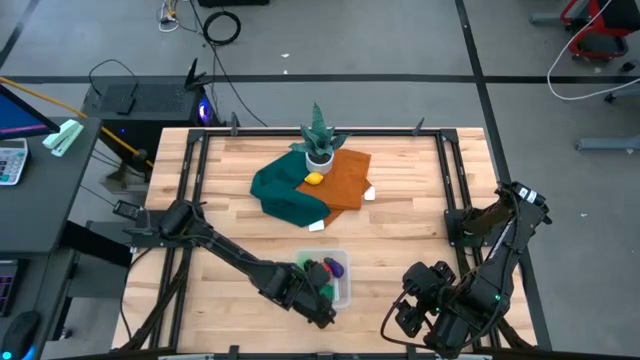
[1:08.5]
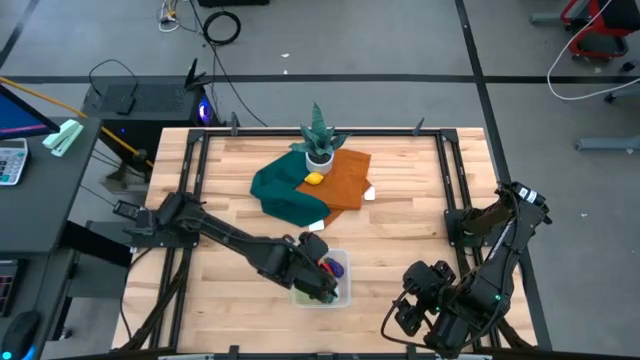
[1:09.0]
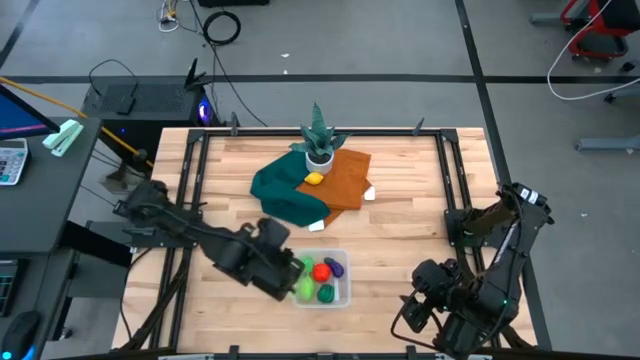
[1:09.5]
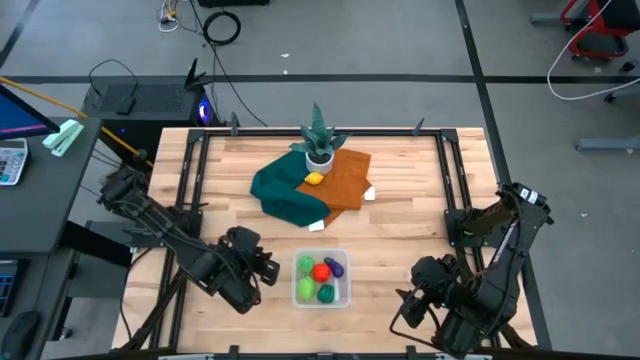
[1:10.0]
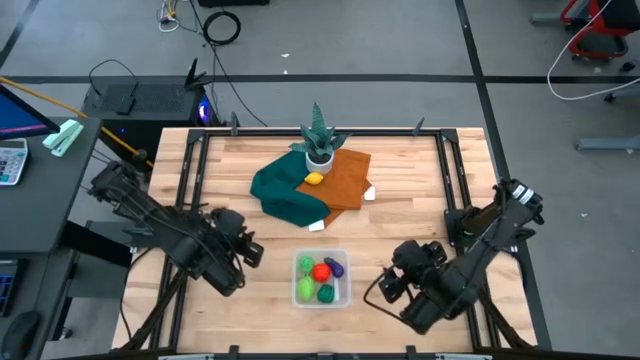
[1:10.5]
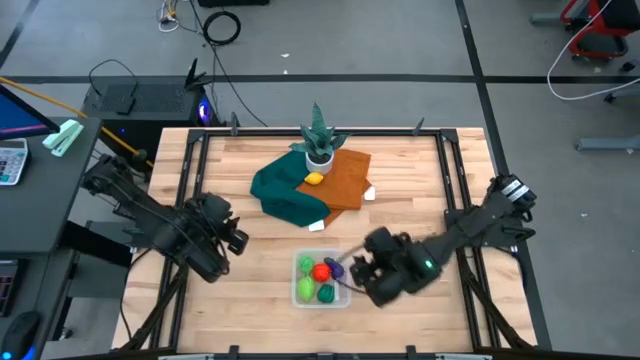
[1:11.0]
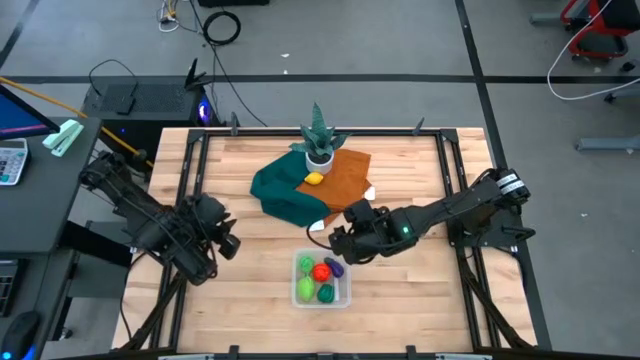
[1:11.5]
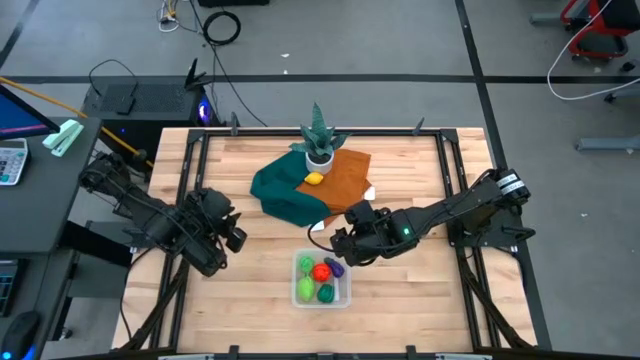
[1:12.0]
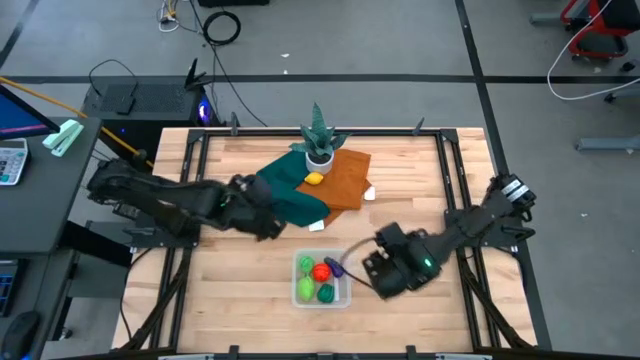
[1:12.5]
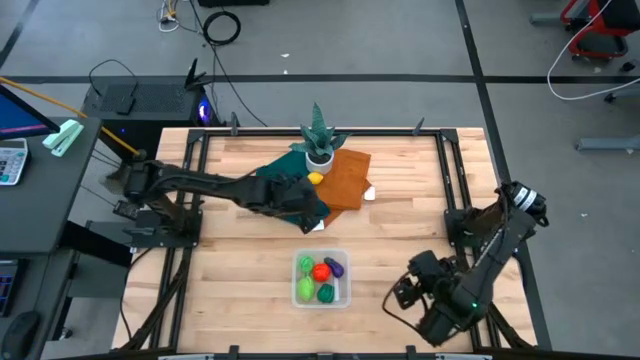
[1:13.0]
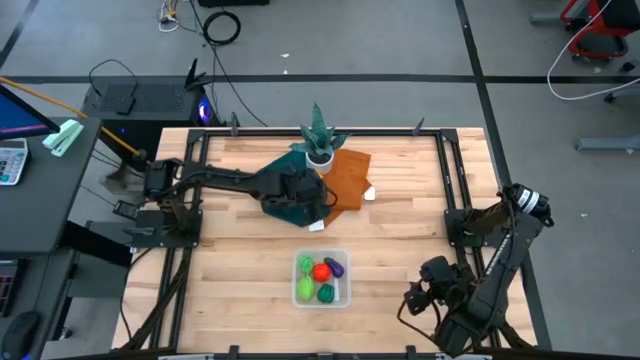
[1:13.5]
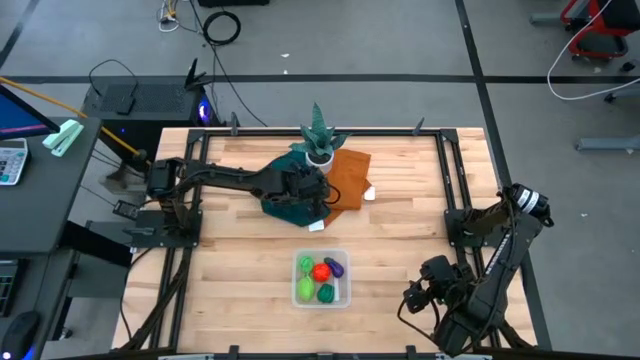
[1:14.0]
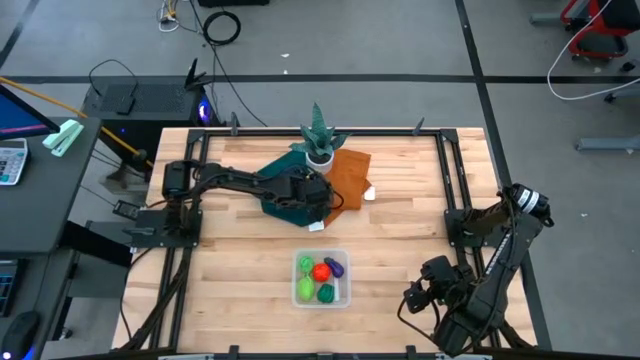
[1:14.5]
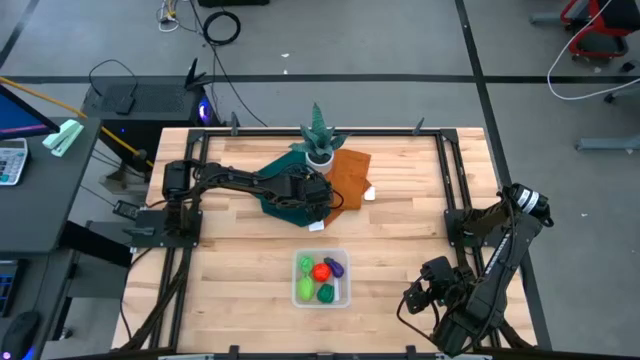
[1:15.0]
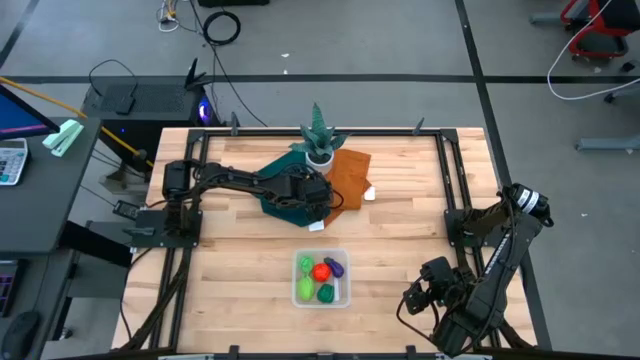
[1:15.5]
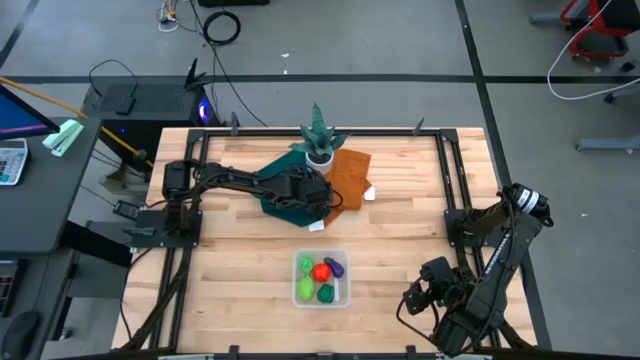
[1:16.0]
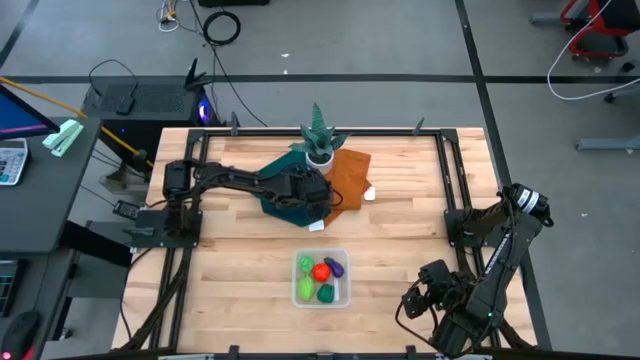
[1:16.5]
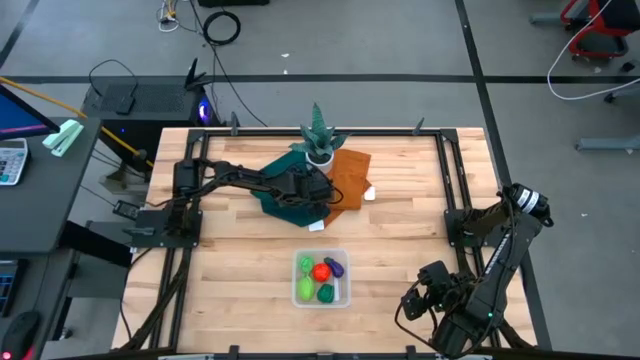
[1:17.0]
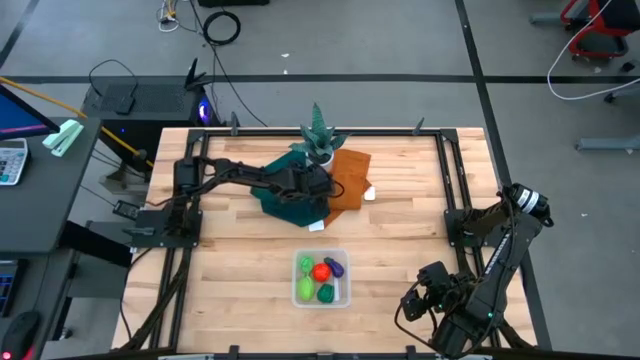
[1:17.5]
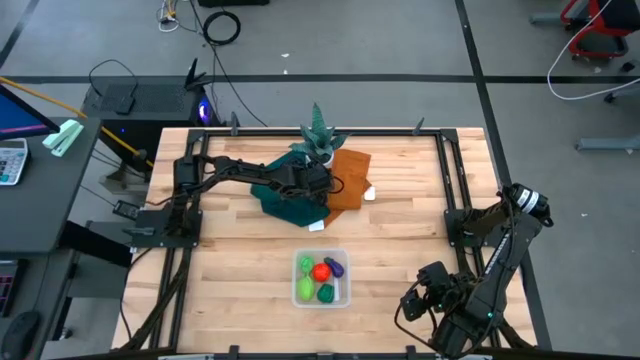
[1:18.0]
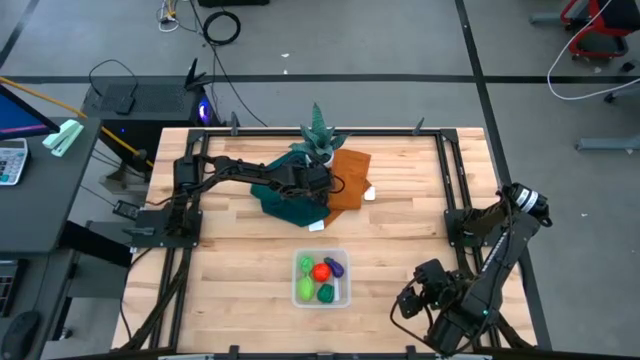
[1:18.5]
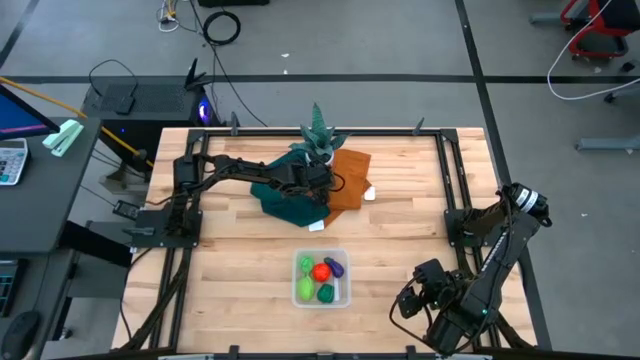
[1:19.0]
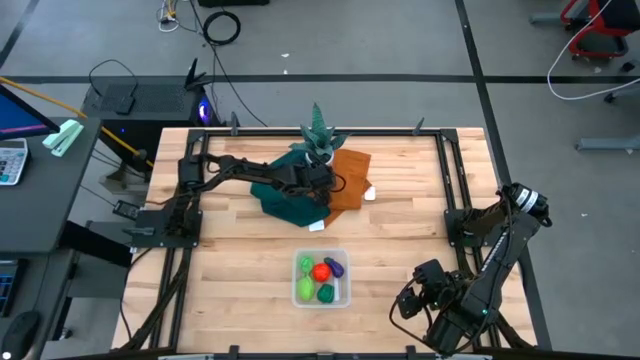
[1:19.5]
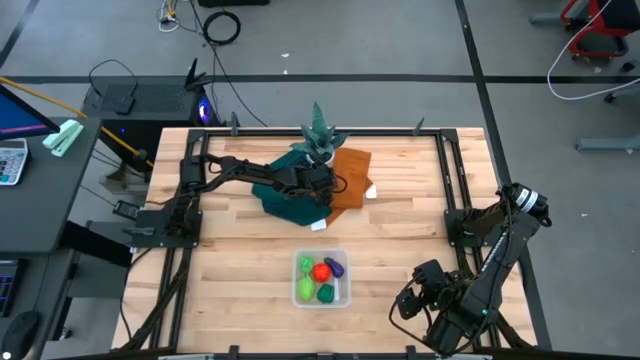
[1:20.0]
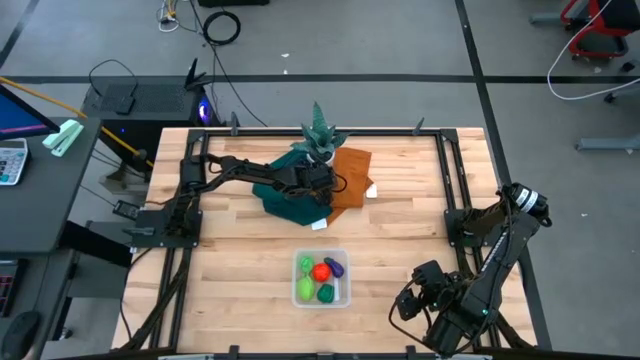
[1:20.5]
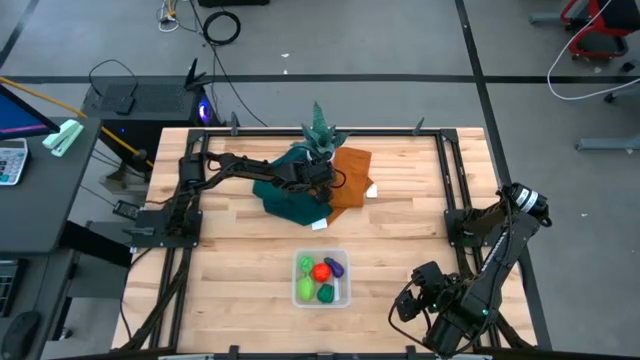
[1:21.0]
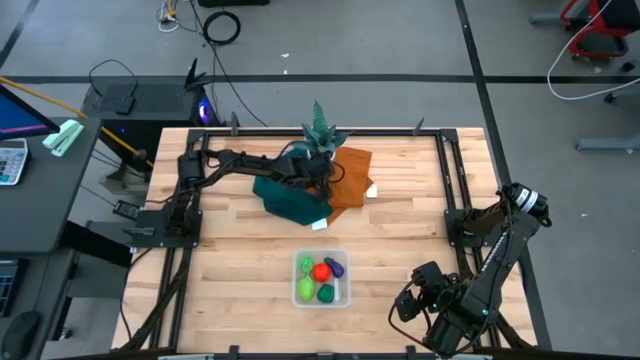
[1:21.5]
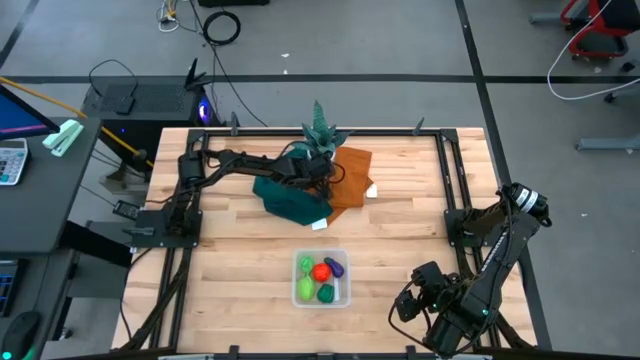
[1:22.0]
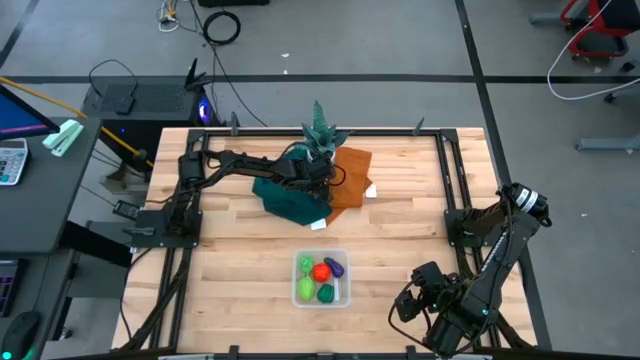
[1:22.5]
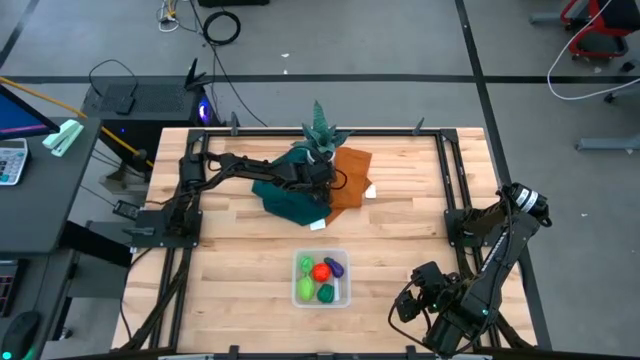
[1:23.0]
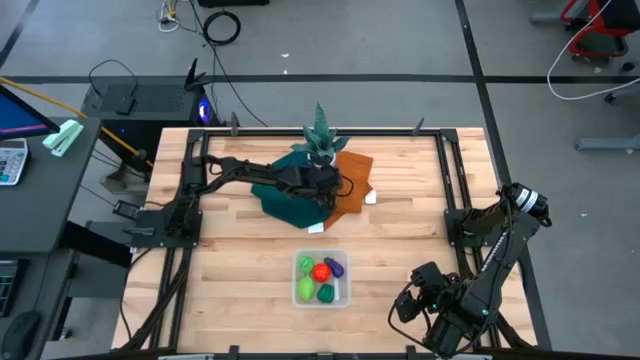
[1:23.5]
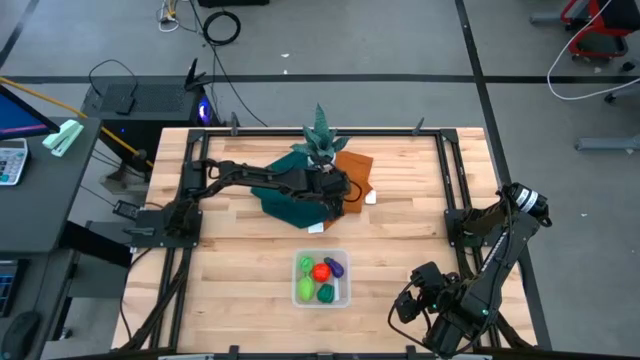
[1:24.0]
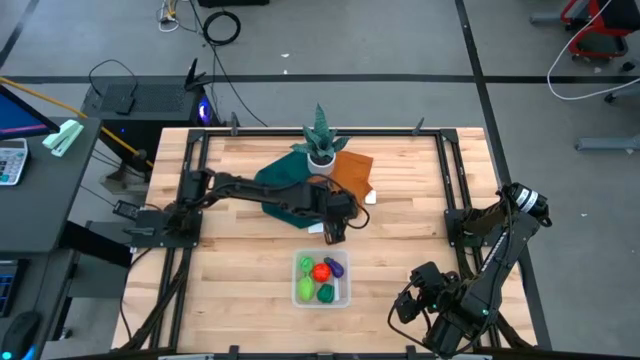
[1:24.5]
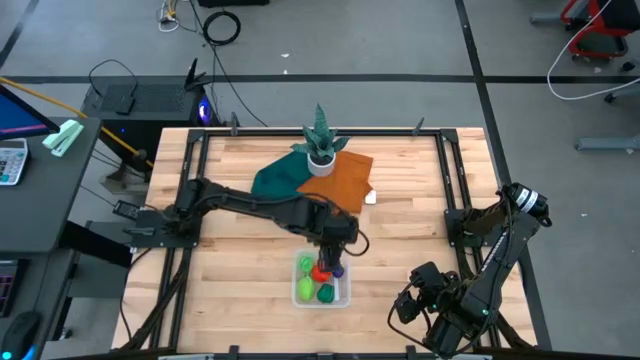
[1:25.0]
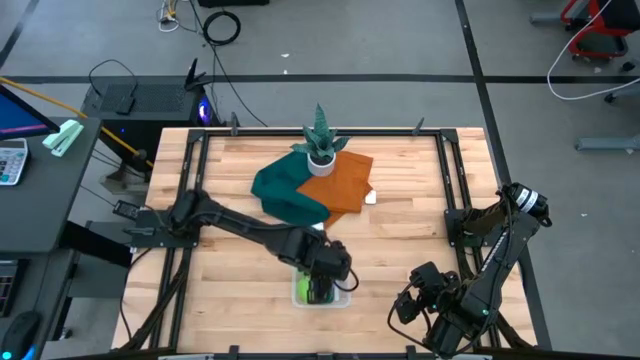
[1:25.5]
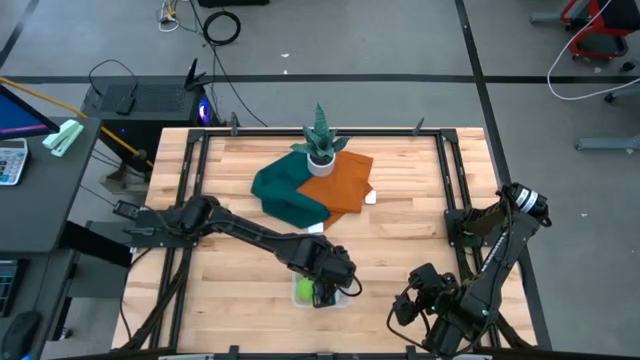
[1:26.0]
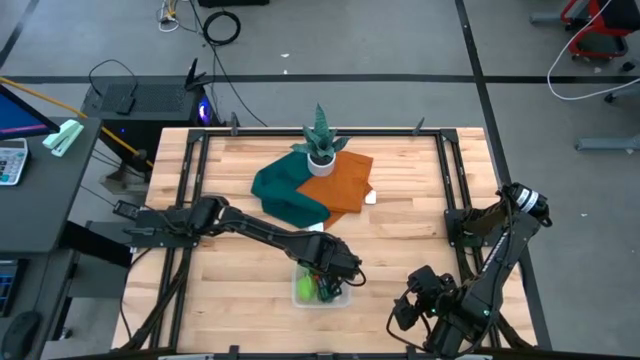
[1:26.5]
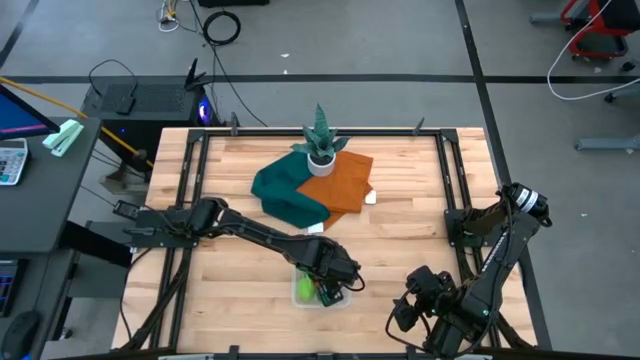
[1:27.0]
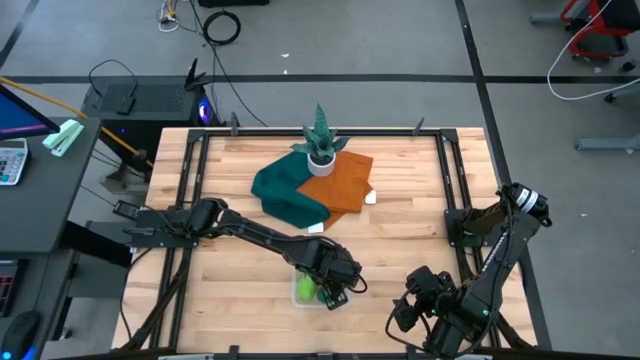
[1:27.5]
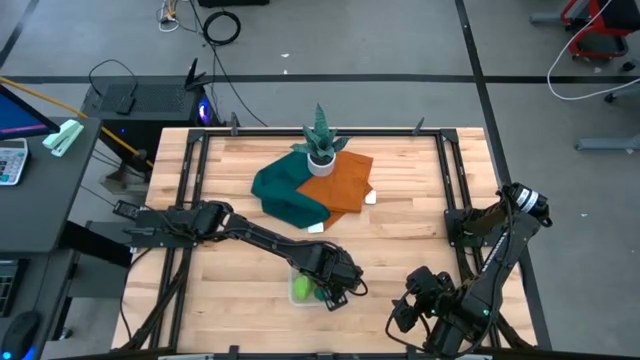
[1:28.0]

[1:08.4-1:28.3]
Task: Pick and placing Produce into tupperware
Put the yellow lemon into the transparent bin

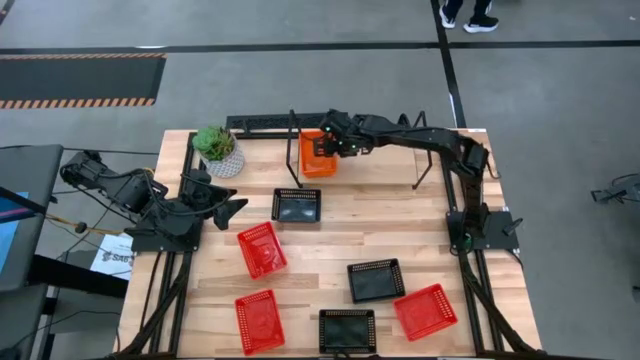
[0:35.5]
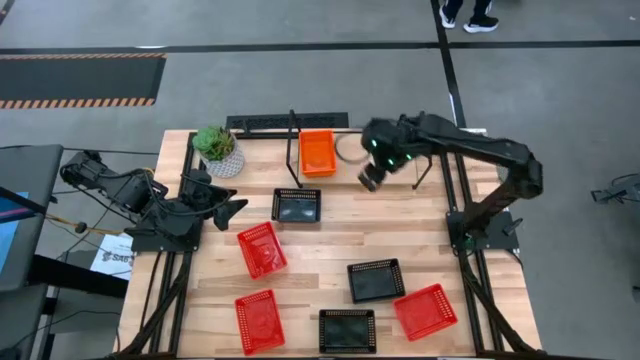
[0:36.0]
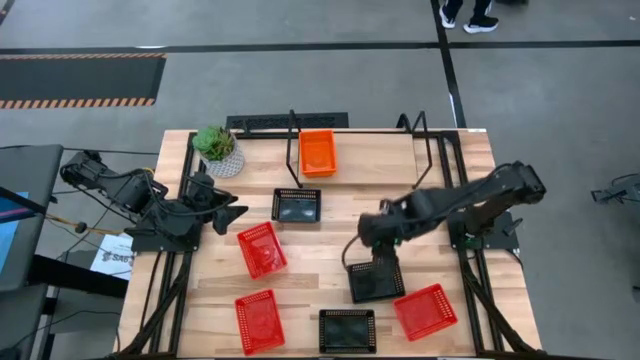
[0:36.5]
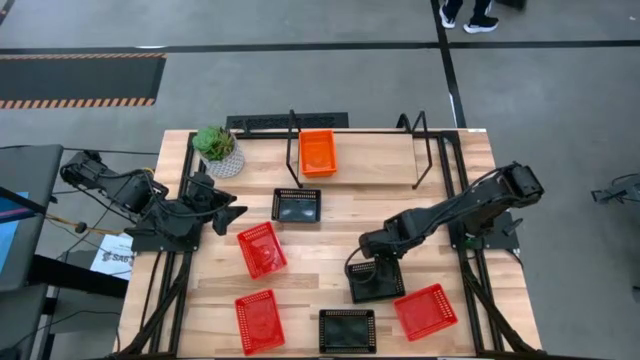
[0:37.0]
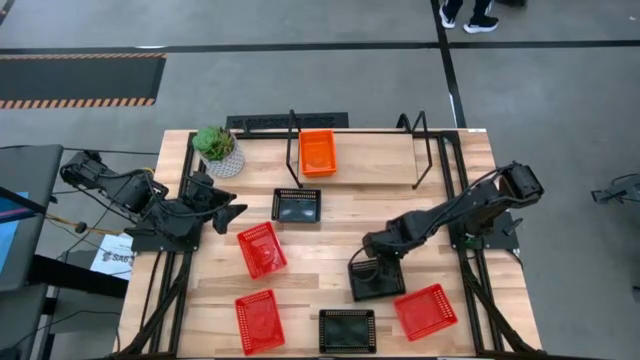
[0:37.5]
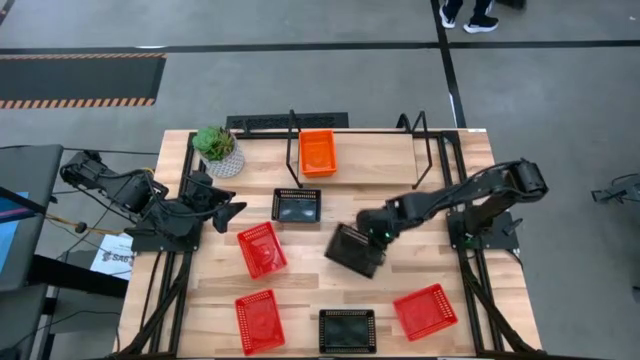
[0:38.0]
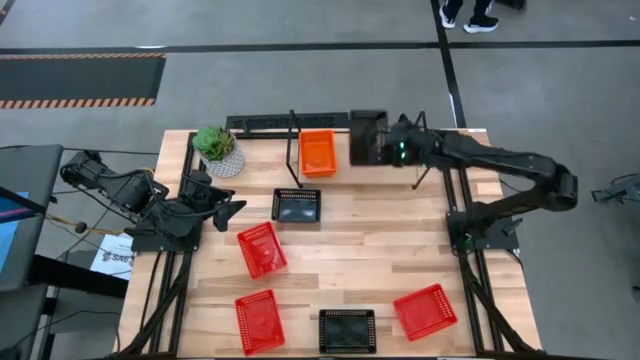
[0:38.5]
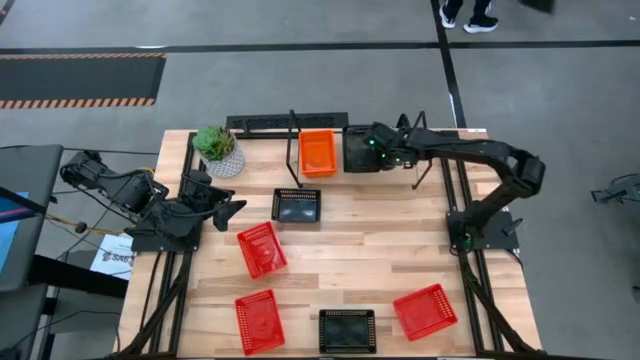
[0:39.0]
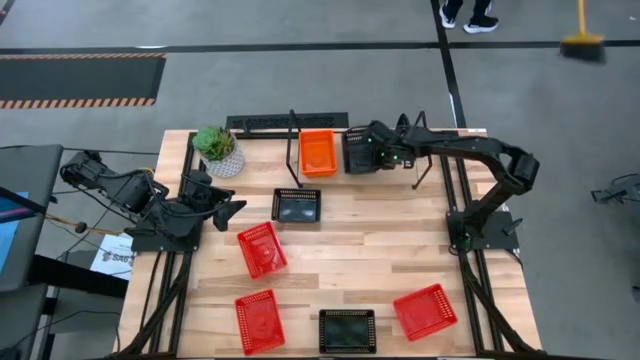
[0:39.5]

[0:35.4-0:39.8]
Task: Stack baskets on shelf by color
Put the middle black bin on the shelf
